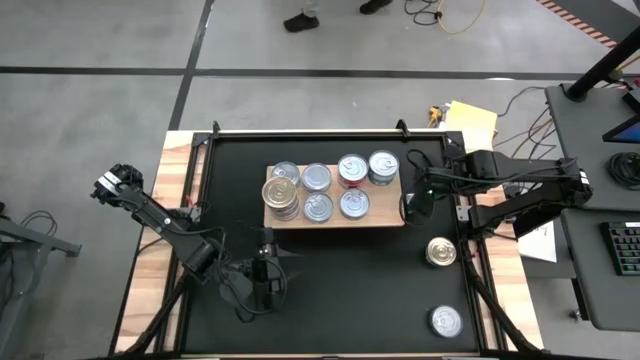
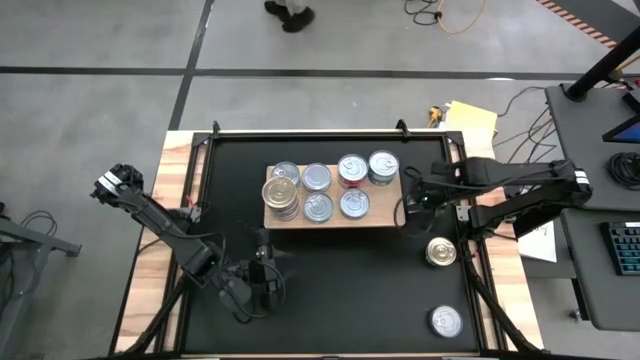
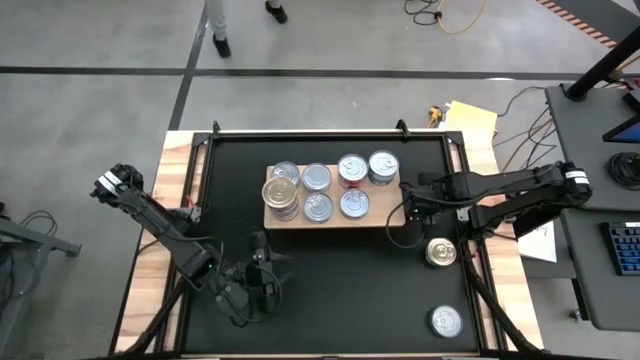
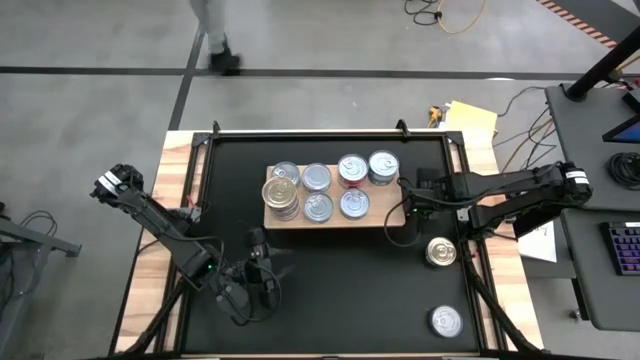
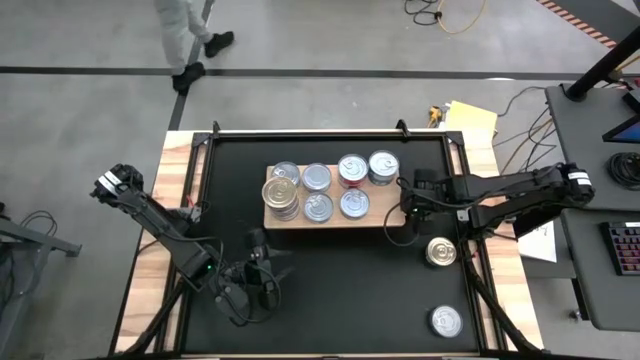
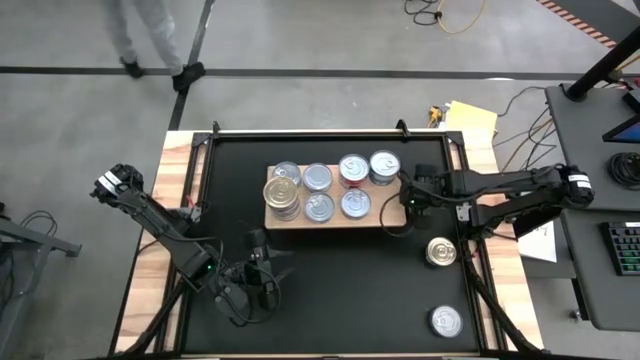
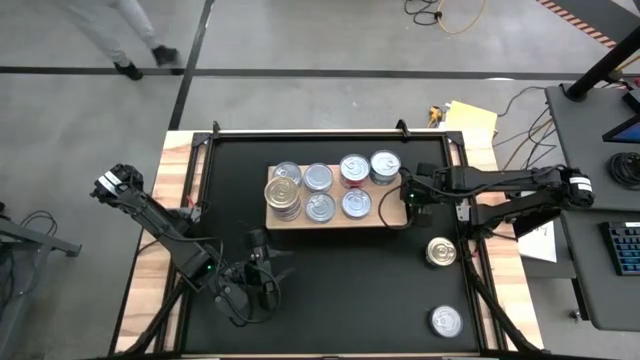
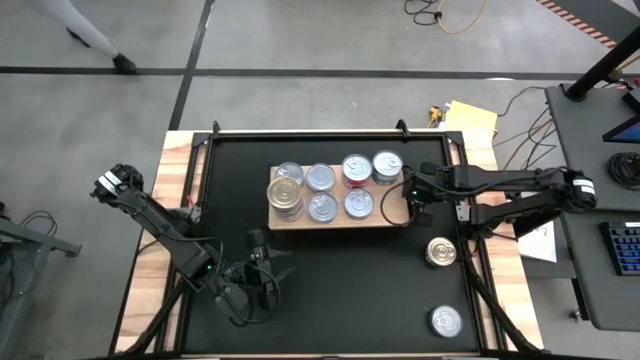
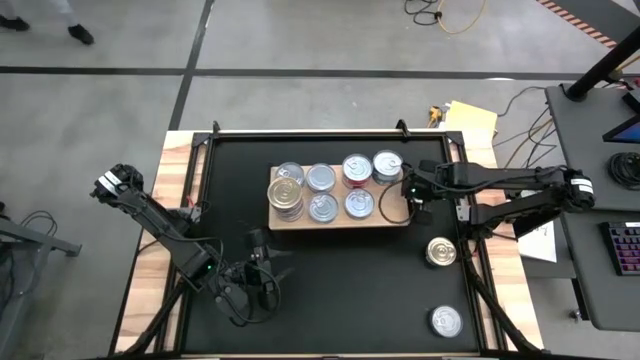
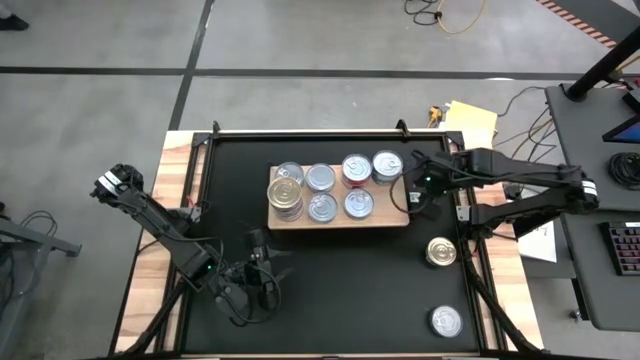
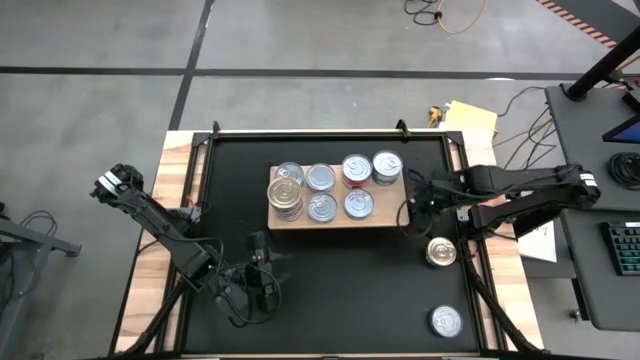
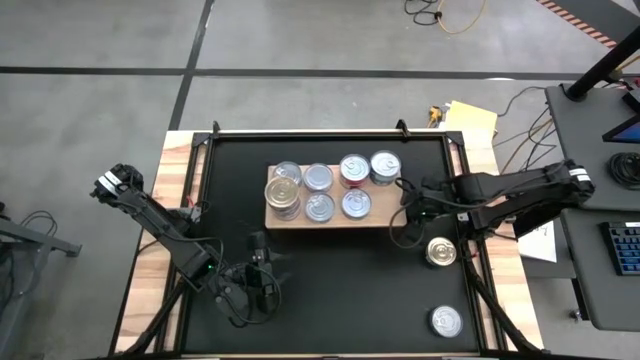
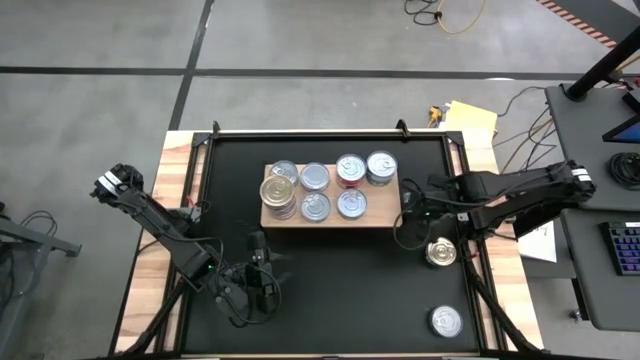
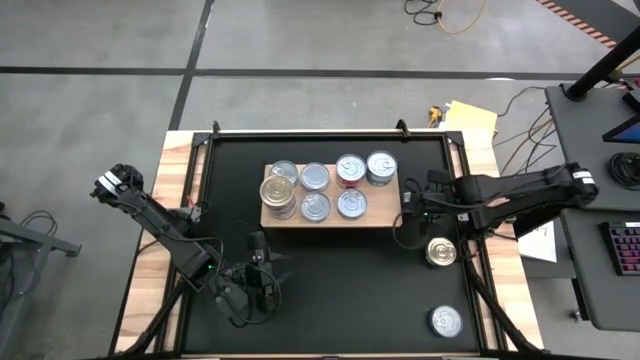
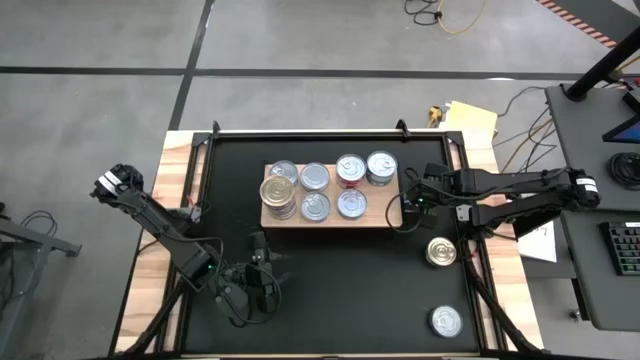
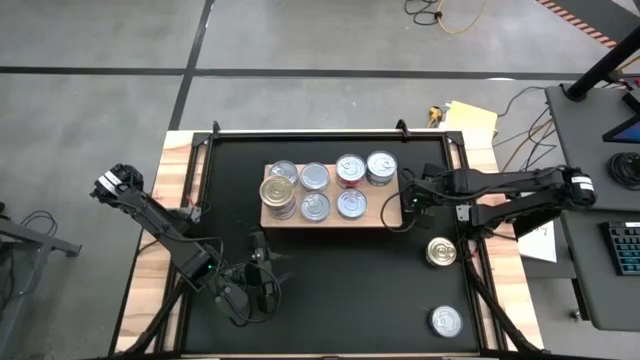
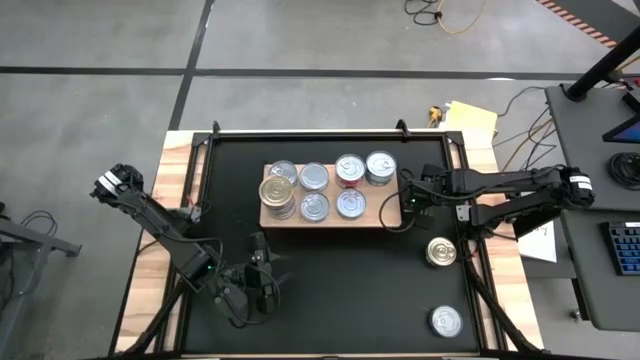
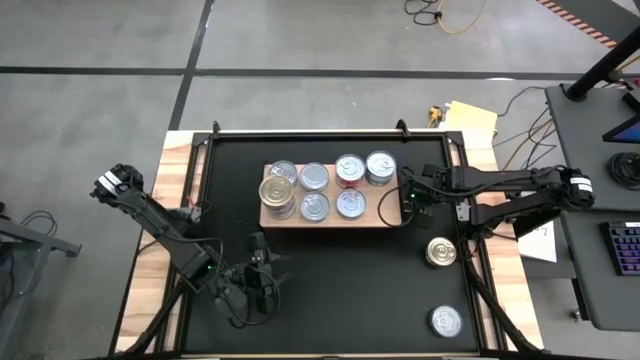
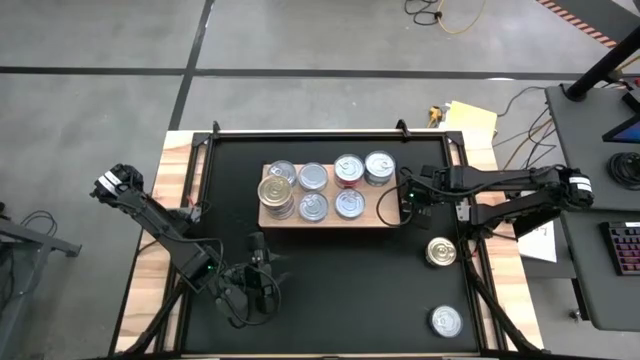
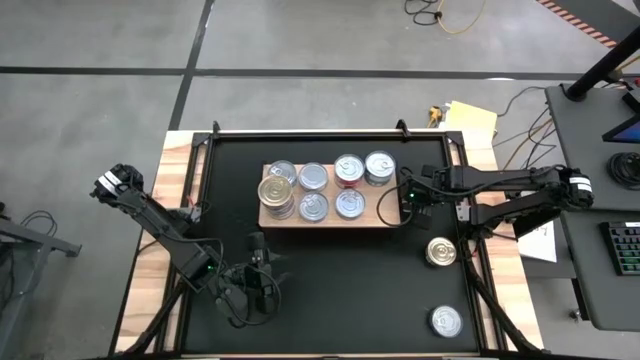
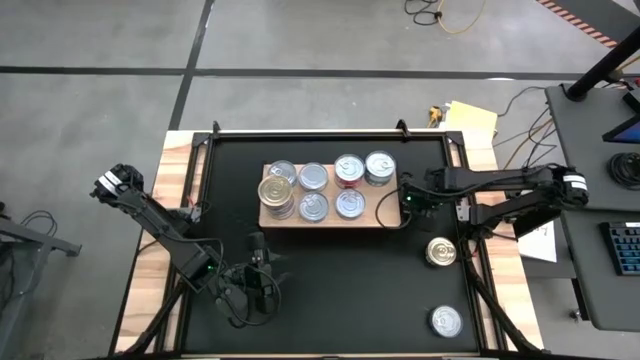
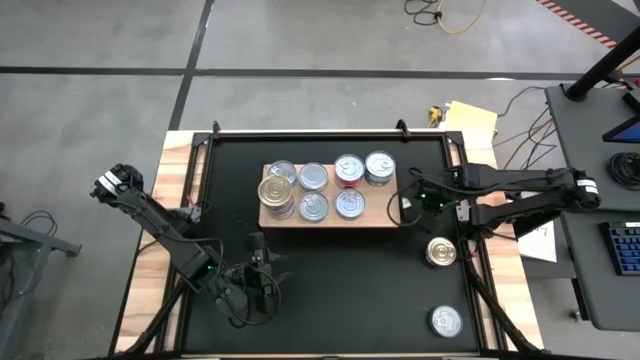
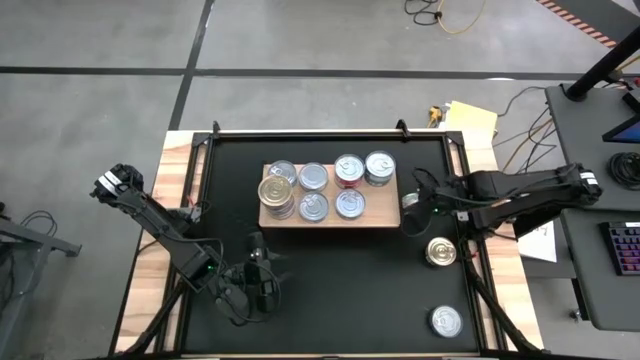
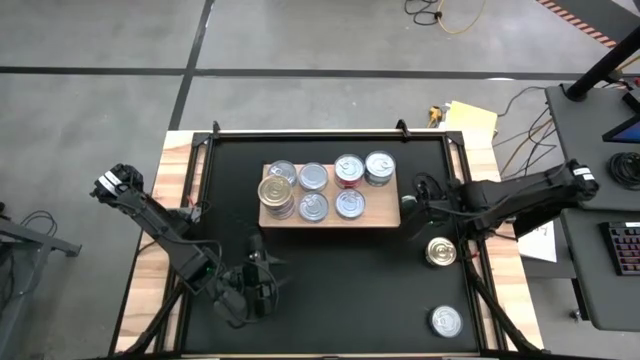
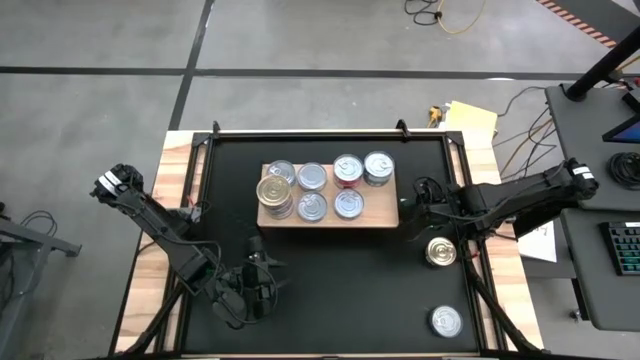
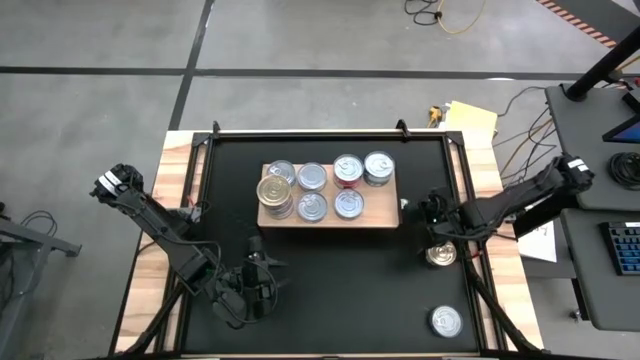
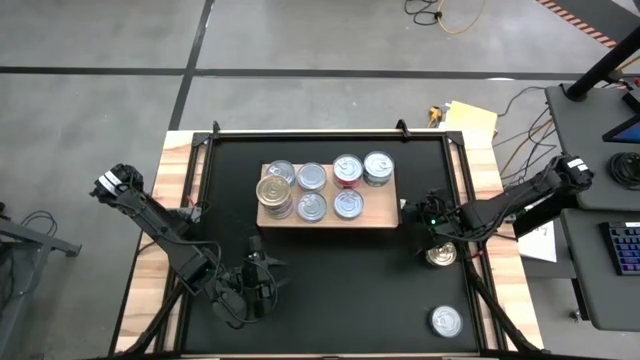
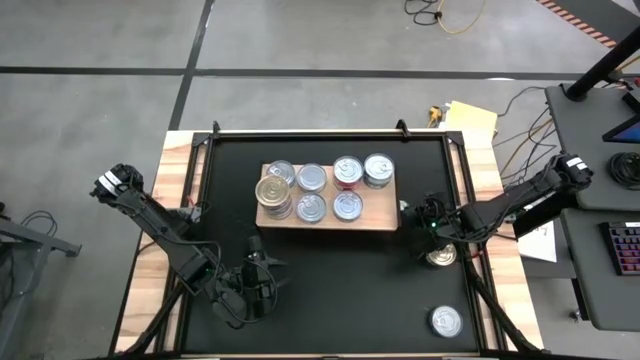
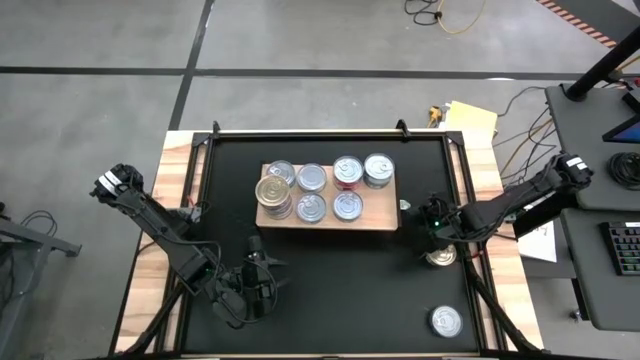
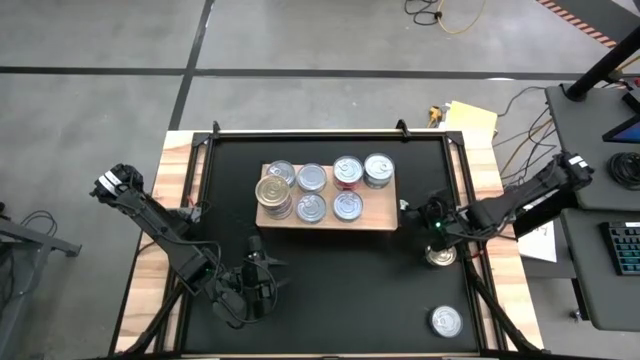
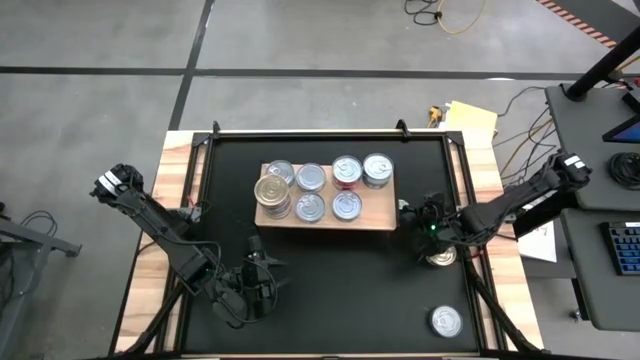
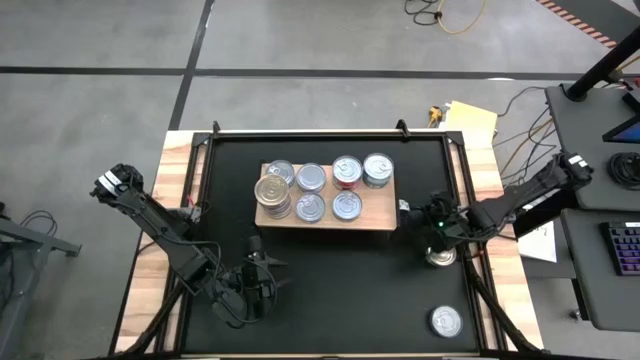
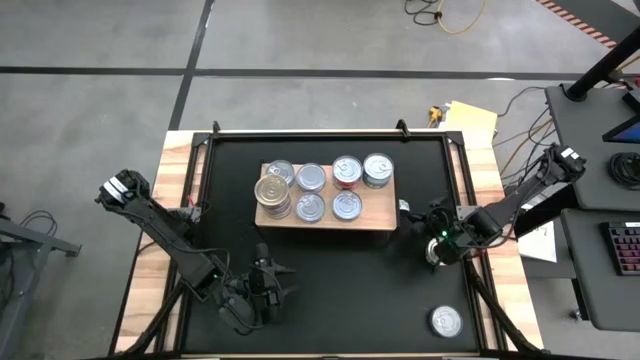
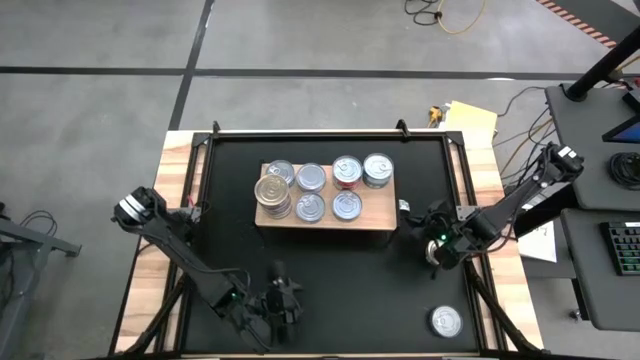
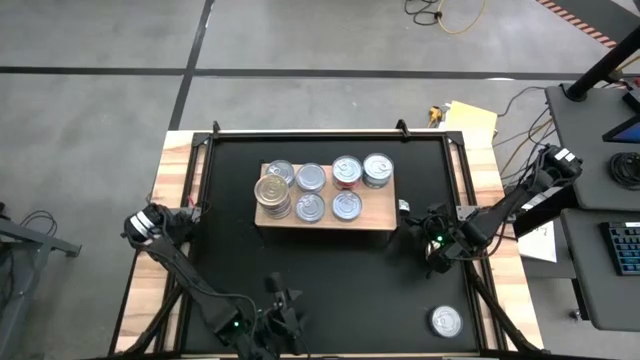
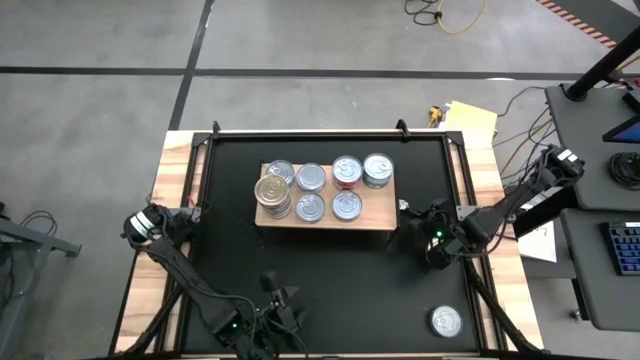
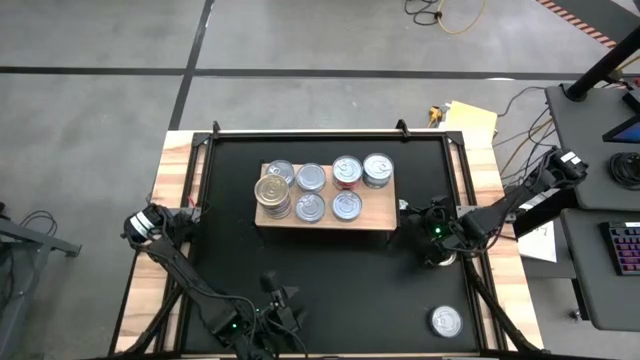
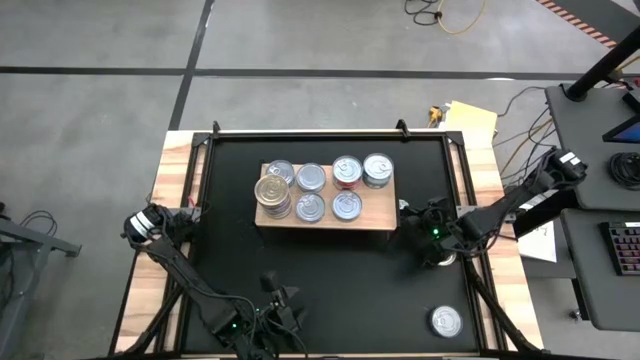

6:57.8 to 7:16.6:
Task: Stack canned seafood by type on shelf
Stack the green tuna can on the green tuna can
